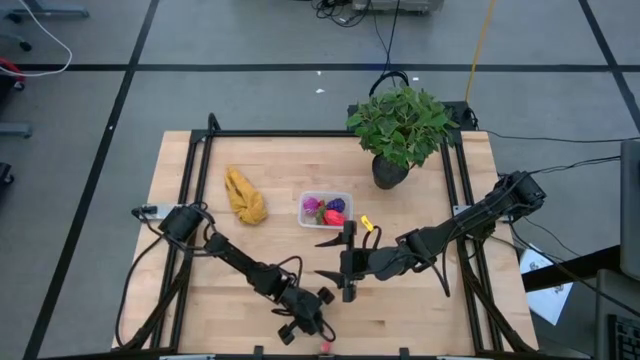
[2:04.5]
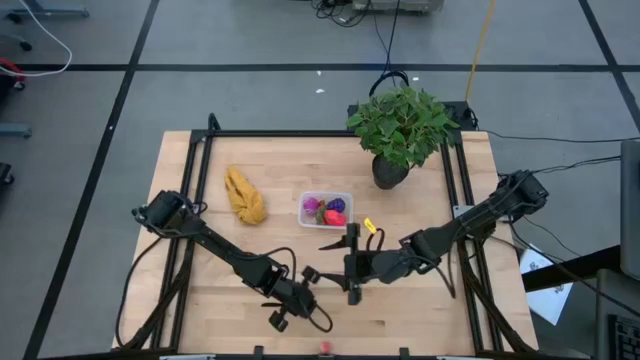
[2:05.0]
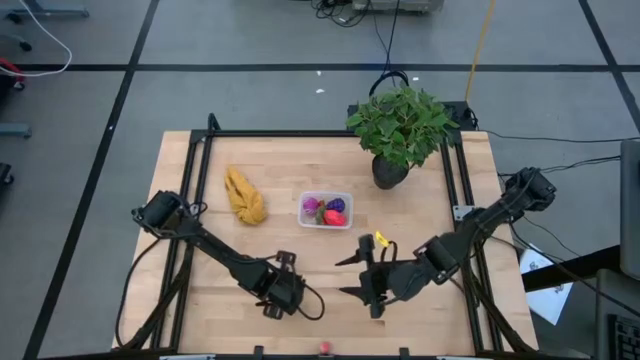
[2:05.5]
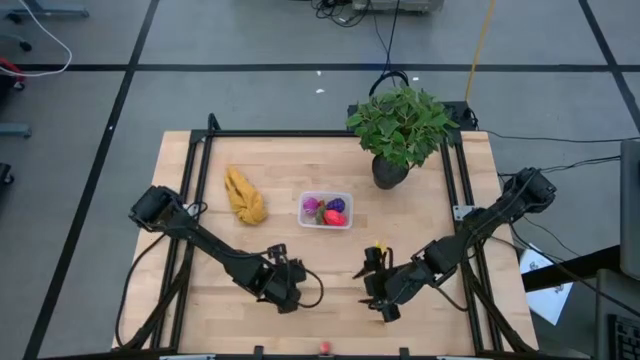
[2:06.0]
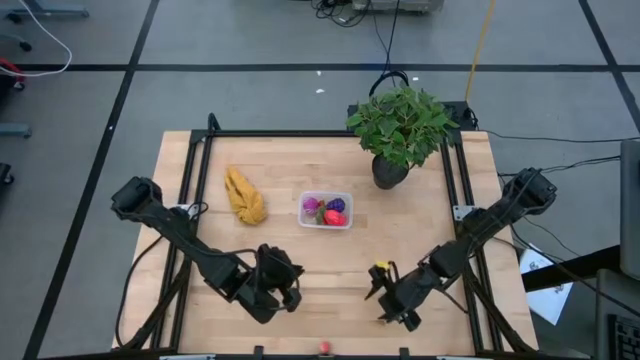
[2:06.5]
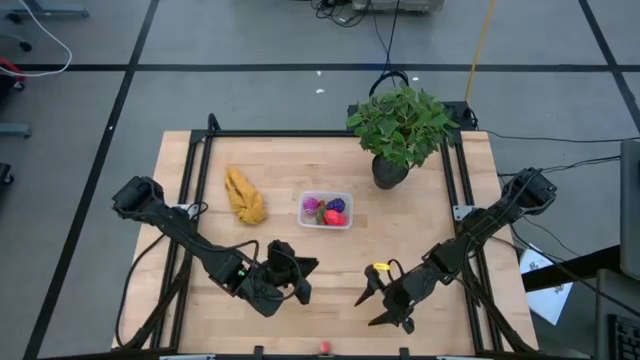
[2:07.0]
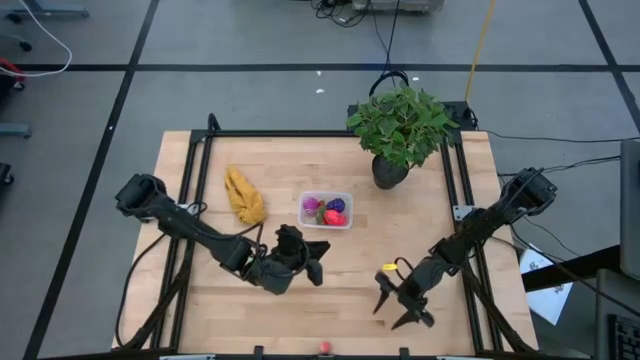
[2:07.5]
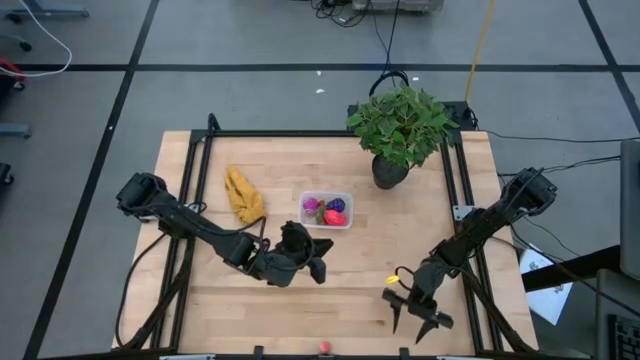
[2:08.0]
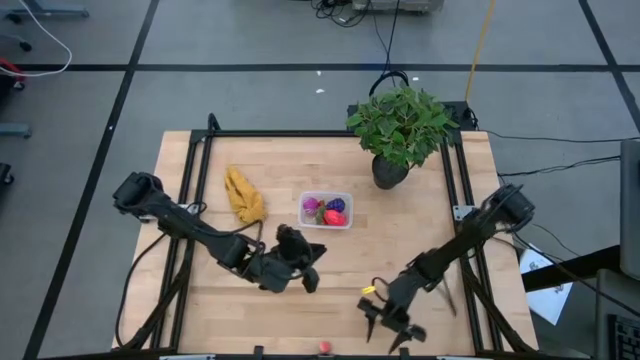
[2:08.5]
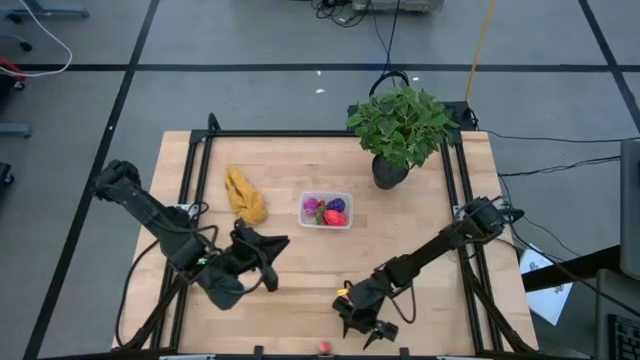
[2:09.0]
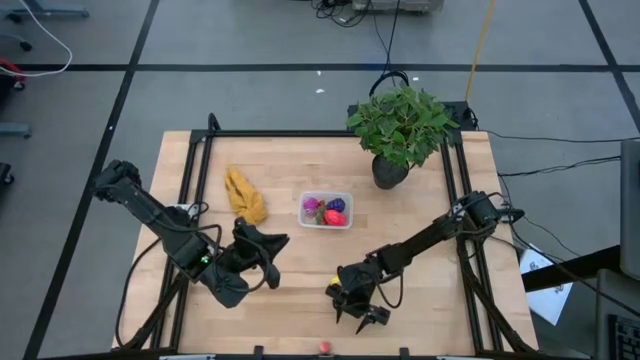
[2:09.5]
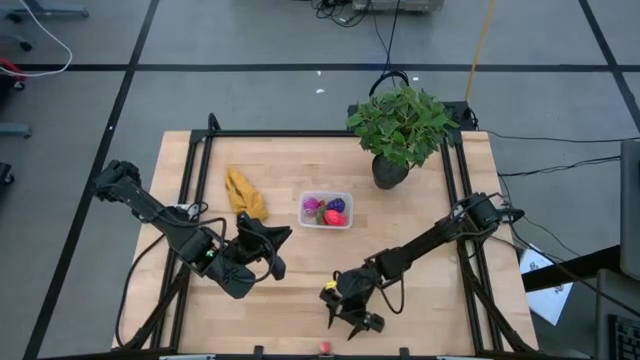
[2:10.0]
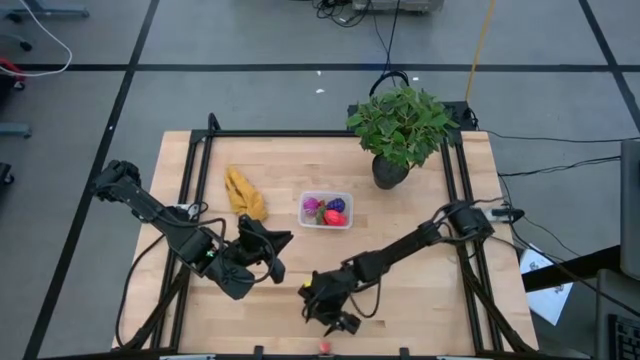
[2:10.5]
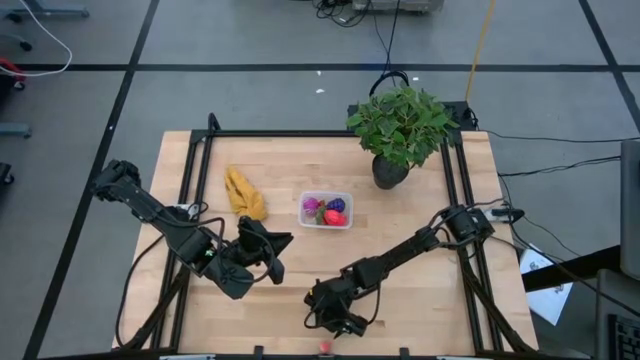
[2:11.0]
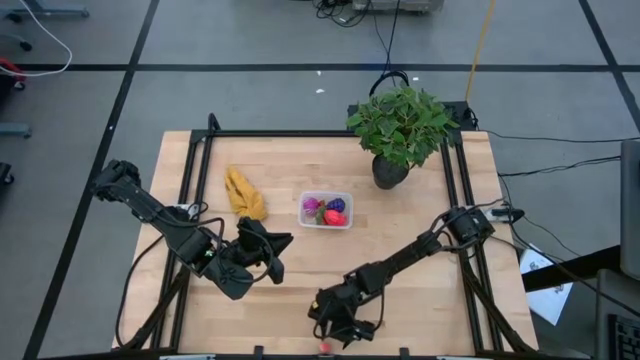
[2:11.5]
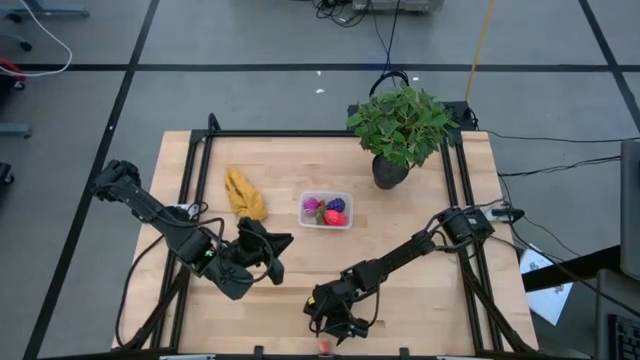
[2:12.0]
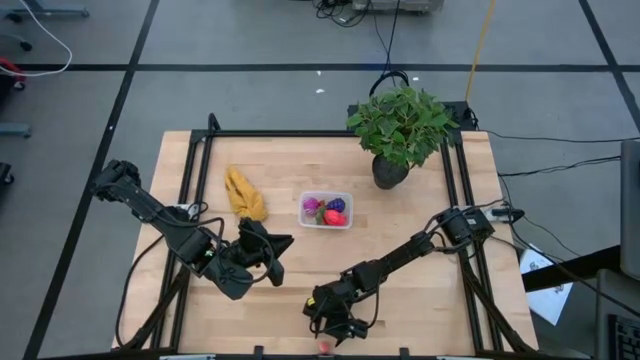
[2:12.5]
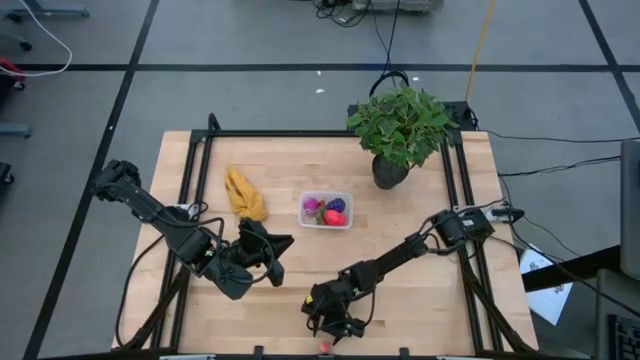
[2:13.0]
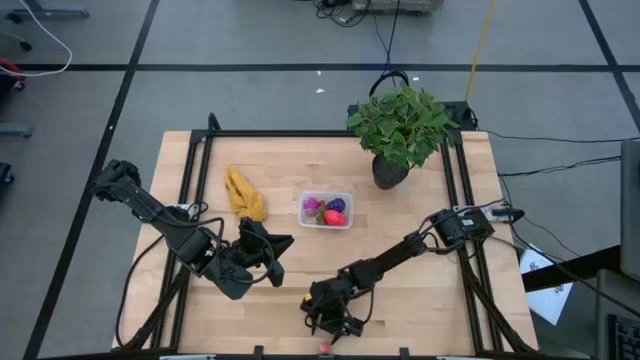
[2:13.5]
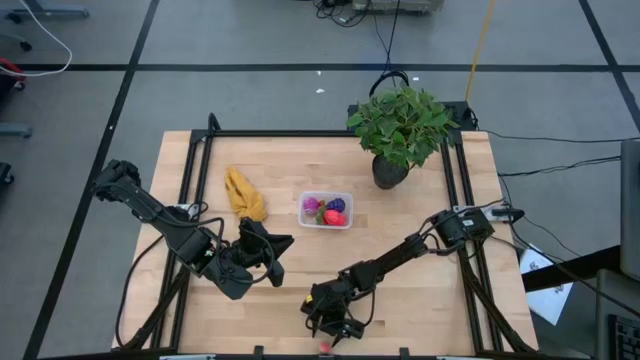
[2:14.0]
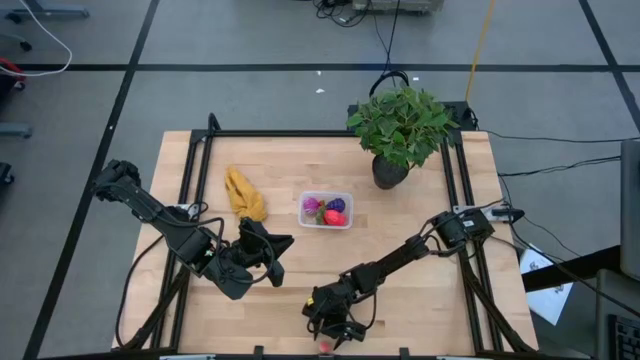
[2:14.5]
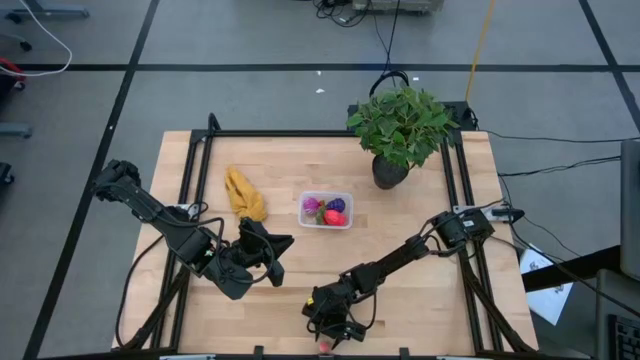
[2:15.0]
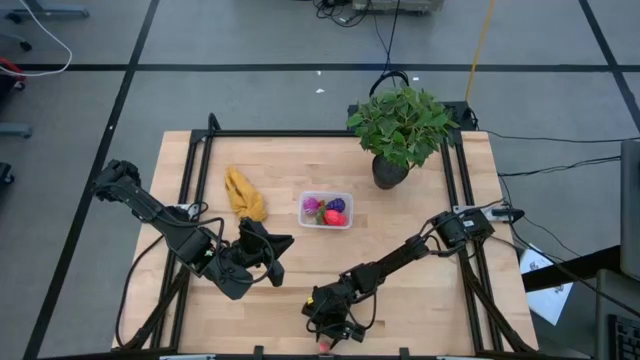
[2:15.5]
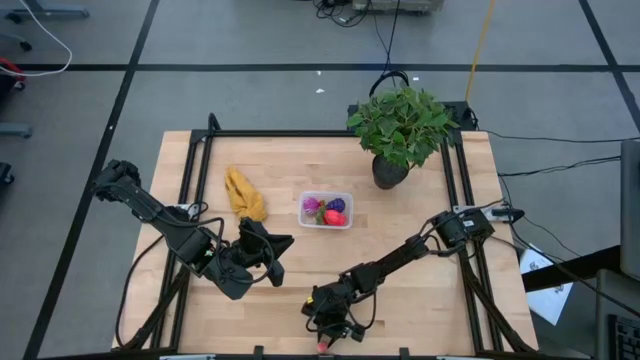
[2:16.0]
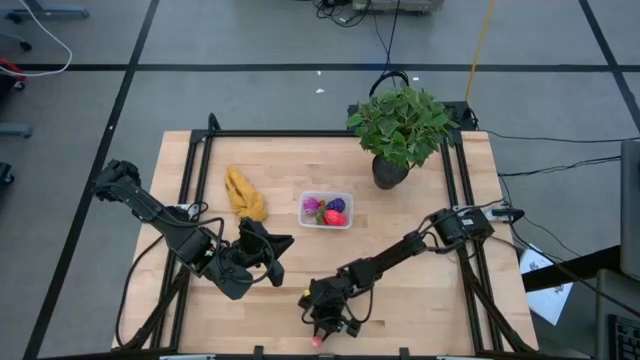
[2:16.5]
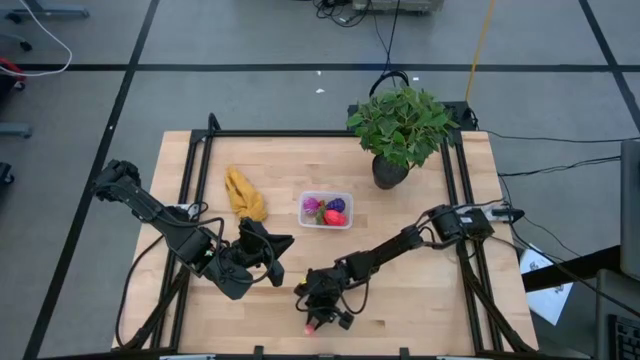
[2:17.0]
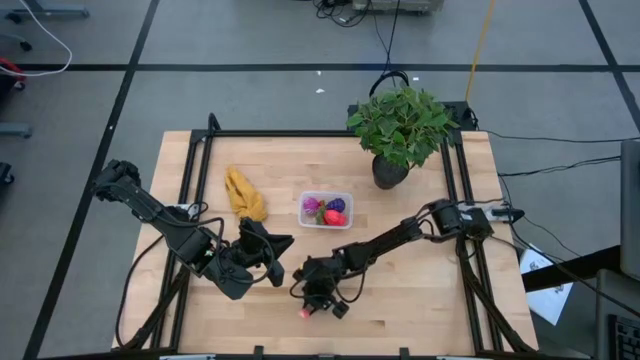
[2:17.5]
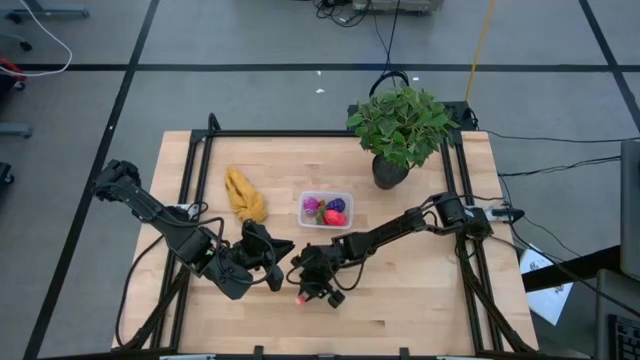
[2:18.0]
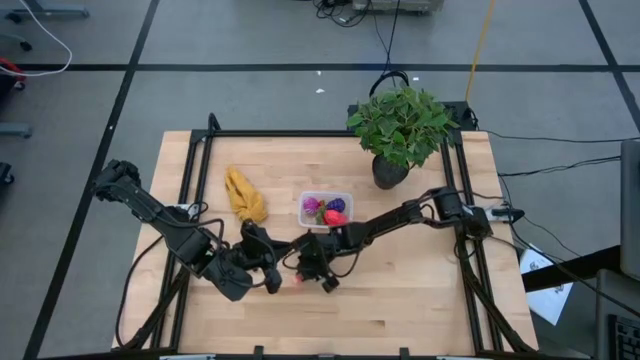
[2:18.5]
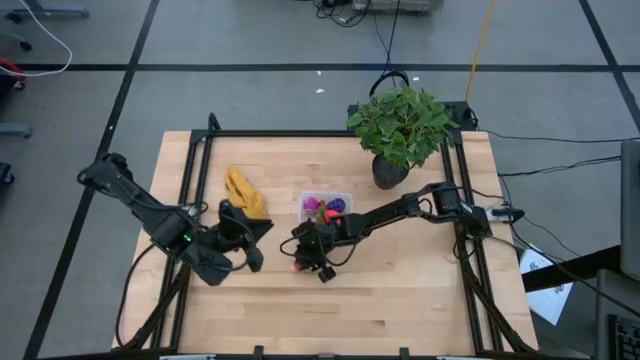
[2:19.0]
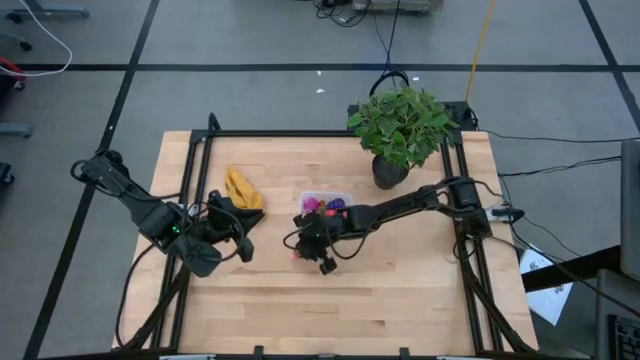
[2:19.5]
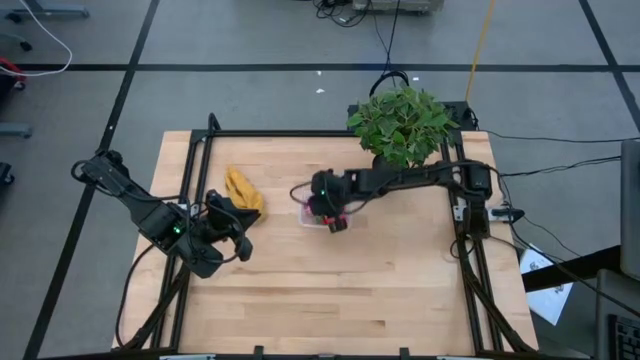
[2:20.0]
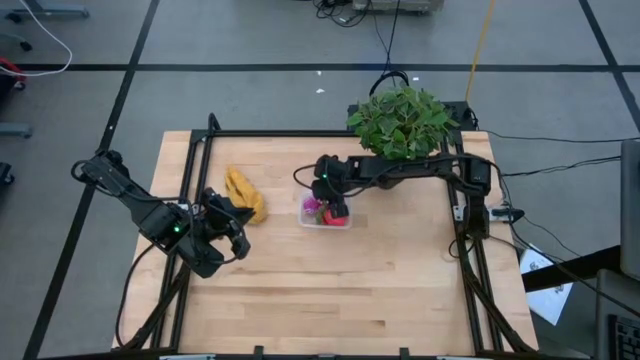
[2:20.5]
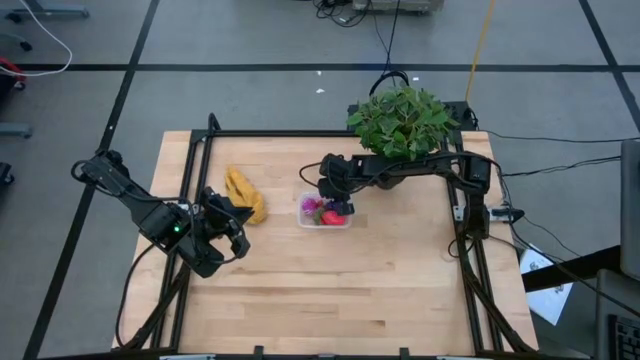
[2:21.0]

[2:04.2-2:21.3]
Task: Pick and placing Produce into tupperware
Put the pink peach into the transparent bin

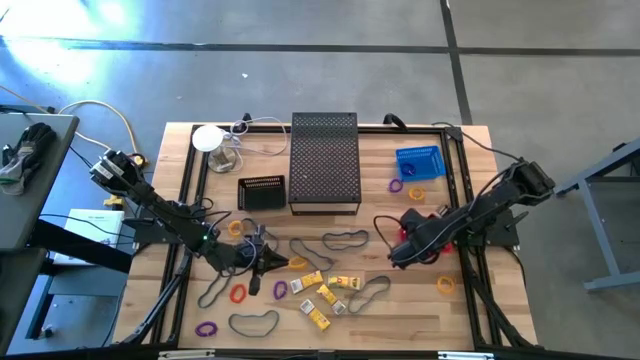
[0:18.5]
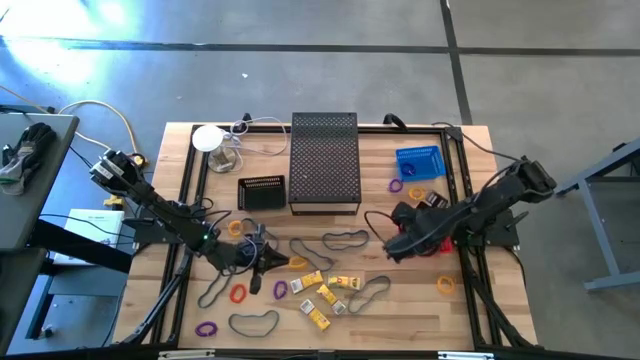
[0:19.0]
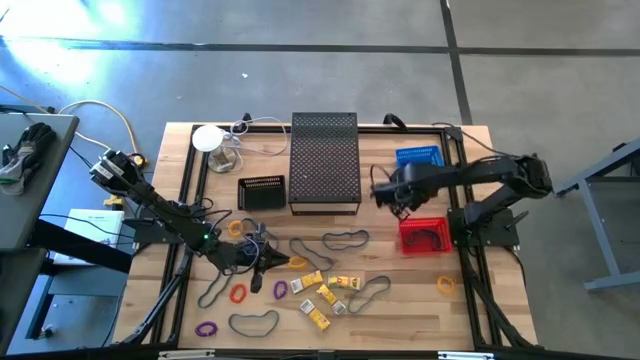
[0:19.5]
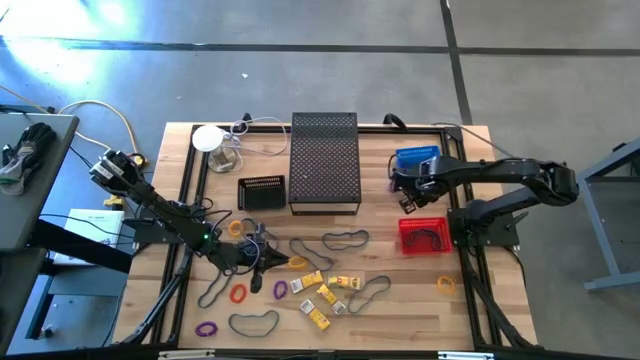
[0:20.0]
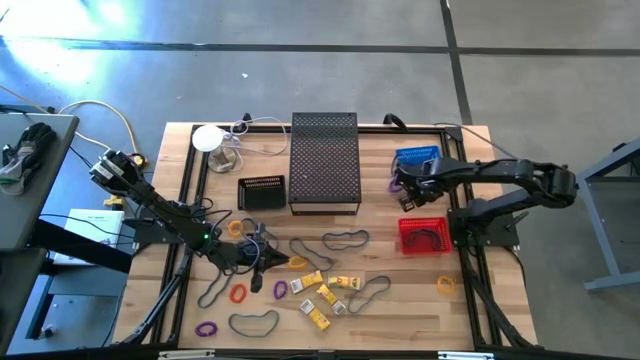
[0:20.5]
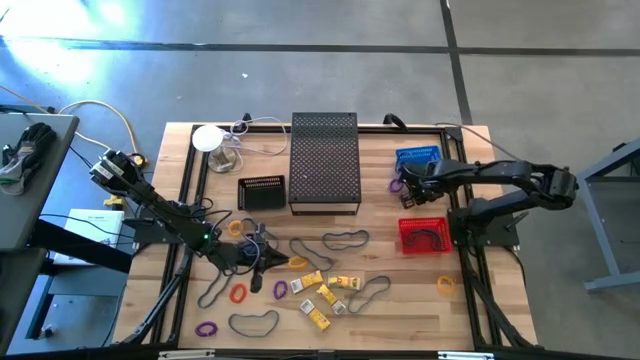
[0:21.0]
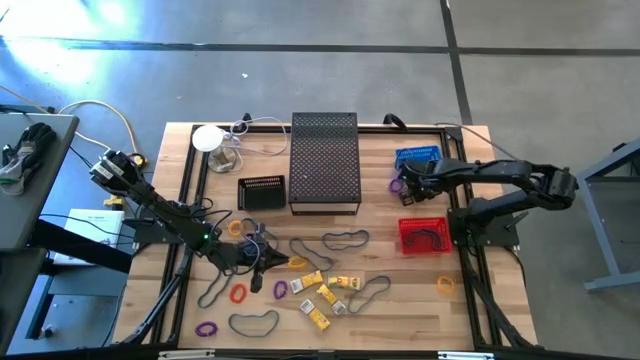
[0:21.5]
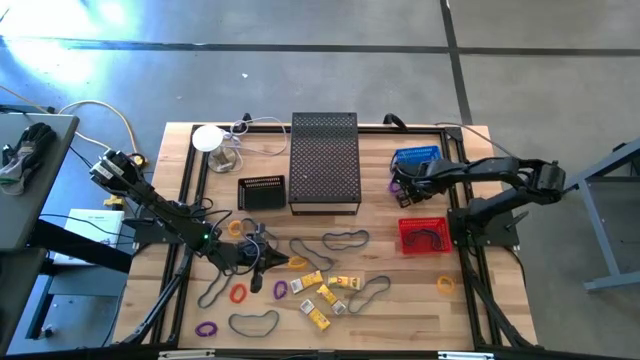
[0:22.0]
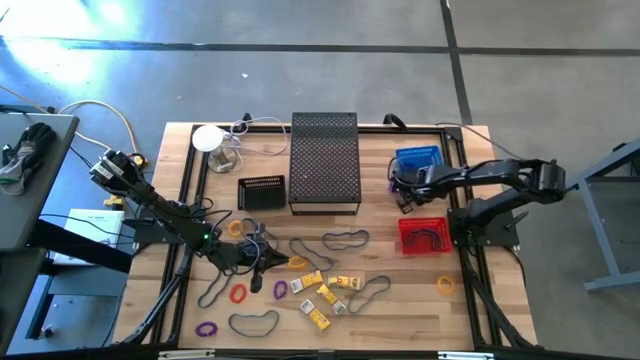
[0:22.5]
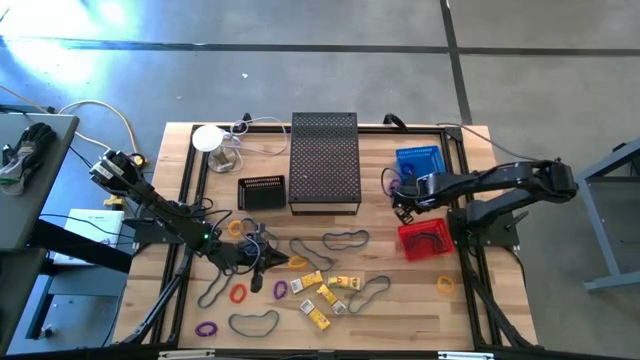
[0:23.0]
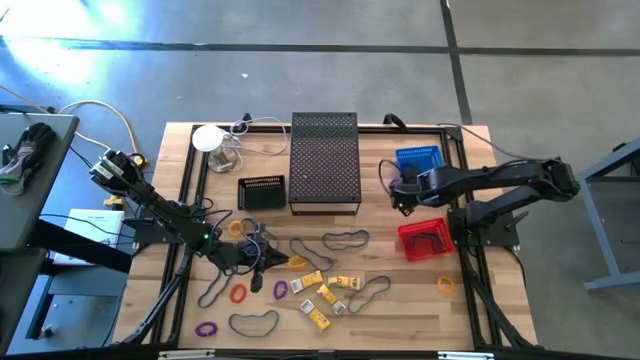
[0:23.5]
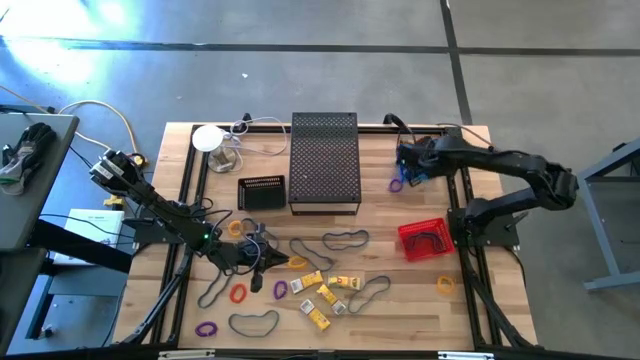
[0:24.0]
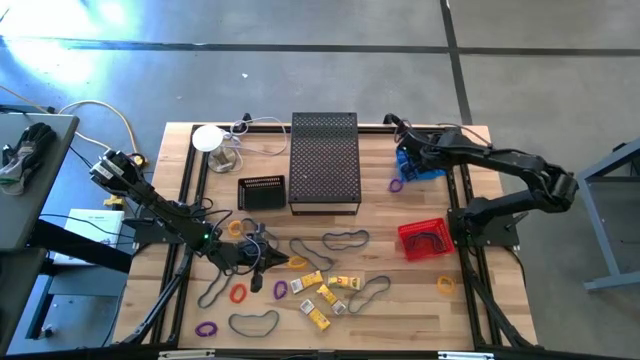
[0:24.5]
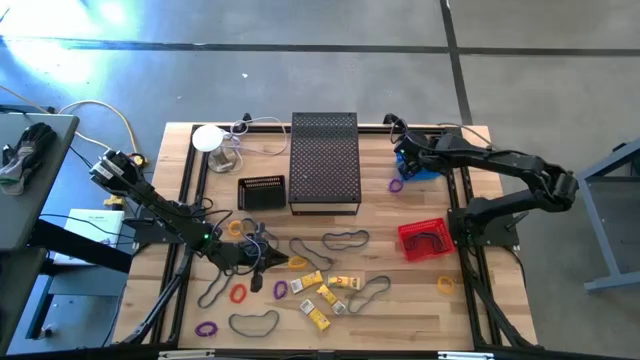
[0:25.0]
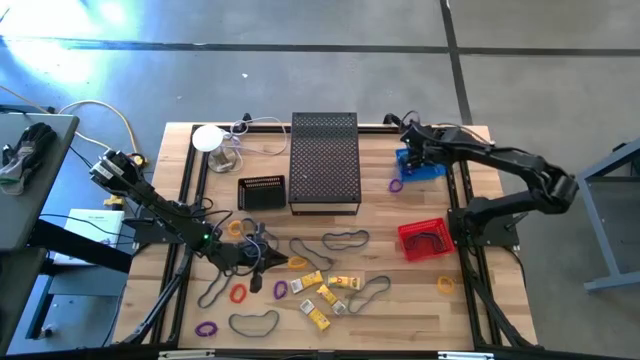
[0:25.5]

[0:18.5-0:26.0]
Task: Pick & Place Office Desk Supplies
Put the yellow spring keychain into the blue bin
